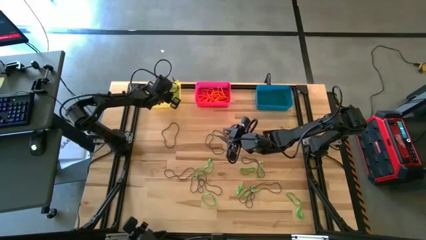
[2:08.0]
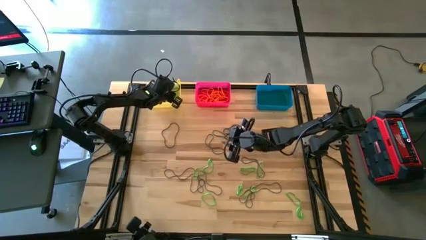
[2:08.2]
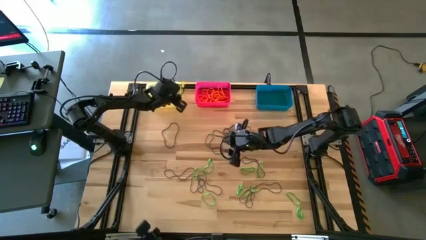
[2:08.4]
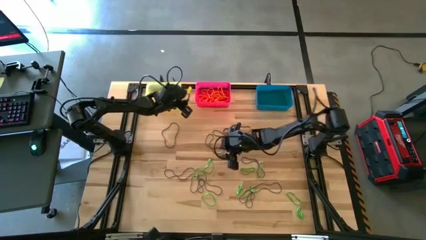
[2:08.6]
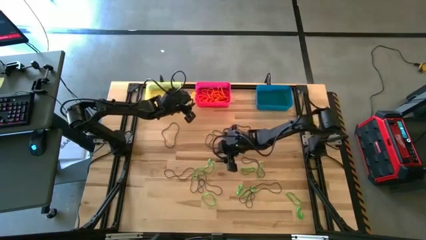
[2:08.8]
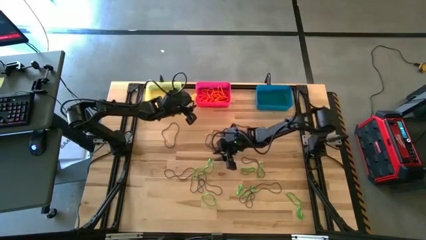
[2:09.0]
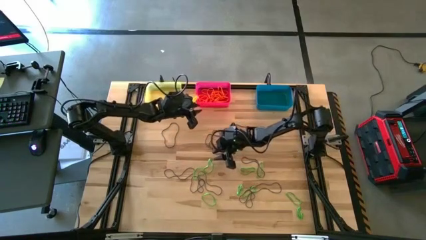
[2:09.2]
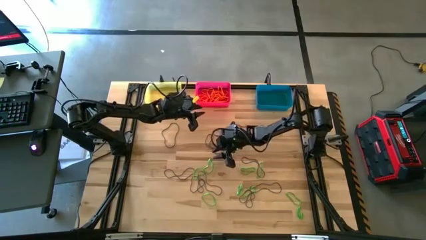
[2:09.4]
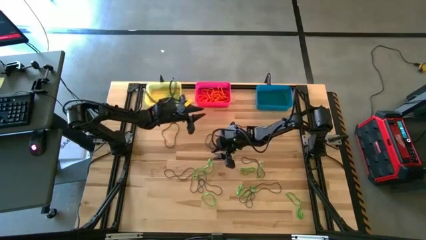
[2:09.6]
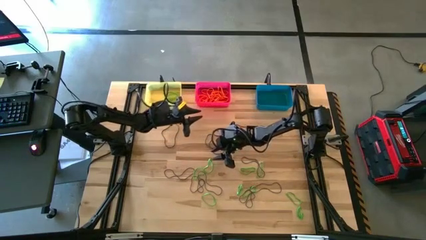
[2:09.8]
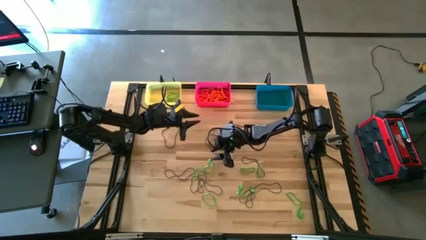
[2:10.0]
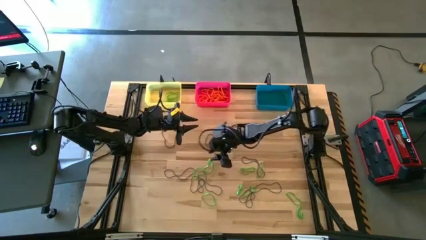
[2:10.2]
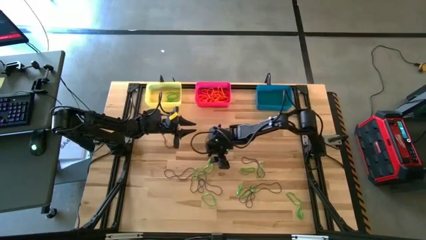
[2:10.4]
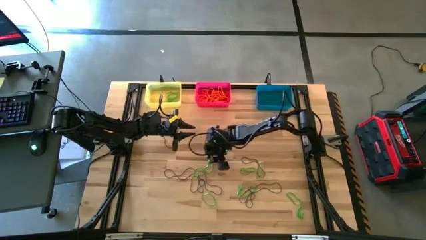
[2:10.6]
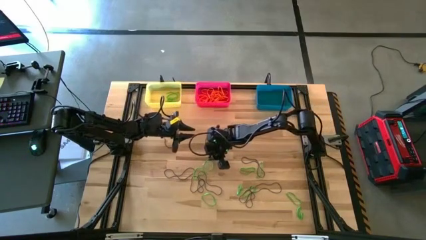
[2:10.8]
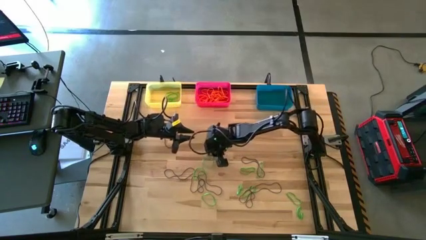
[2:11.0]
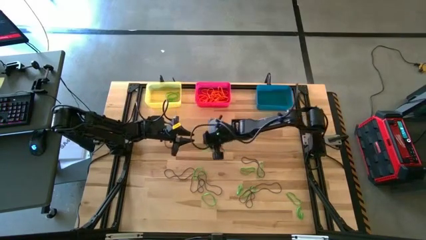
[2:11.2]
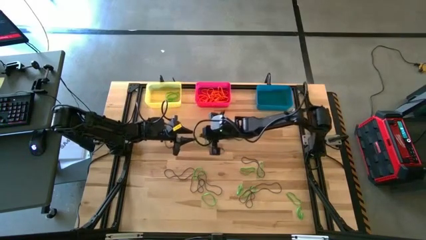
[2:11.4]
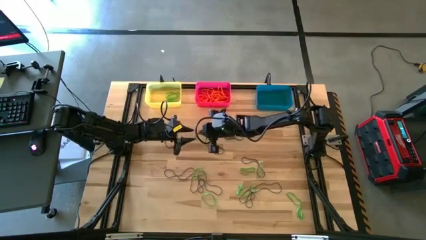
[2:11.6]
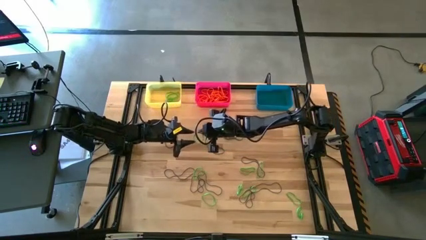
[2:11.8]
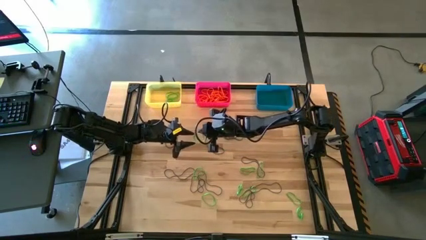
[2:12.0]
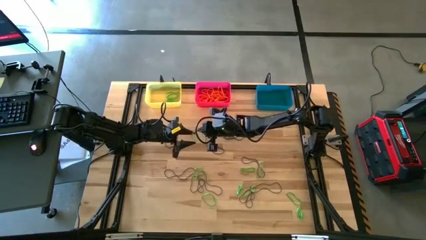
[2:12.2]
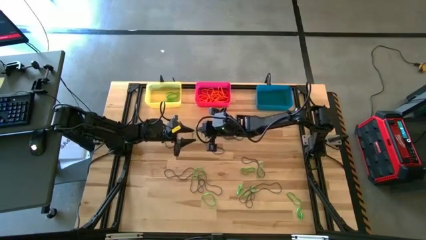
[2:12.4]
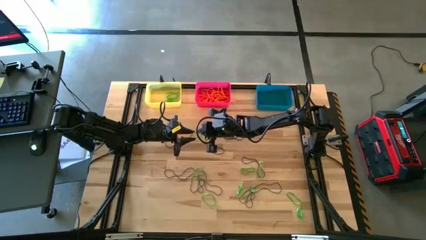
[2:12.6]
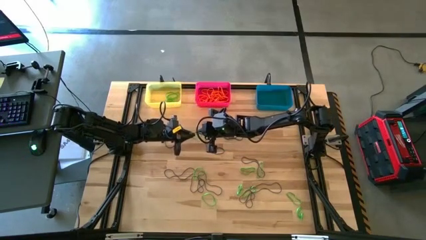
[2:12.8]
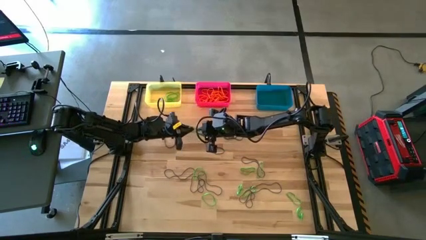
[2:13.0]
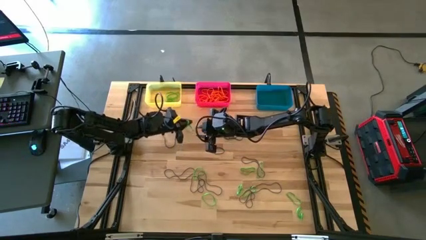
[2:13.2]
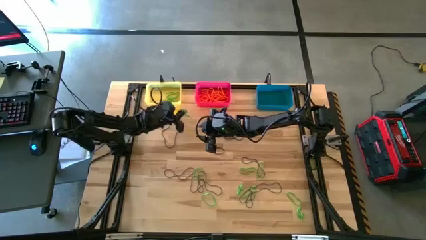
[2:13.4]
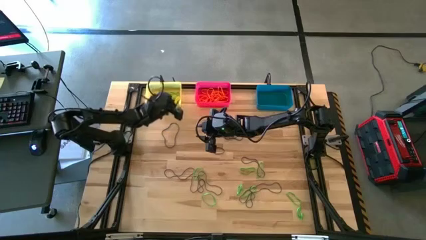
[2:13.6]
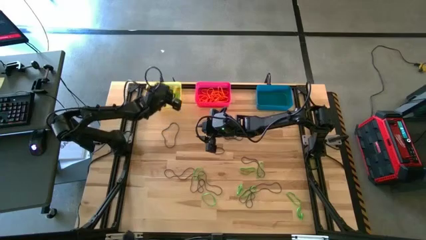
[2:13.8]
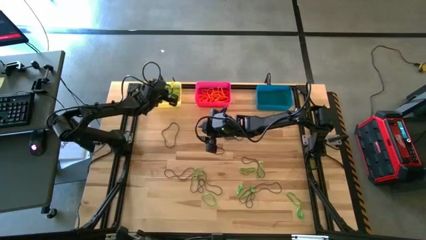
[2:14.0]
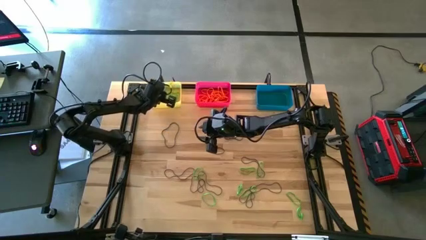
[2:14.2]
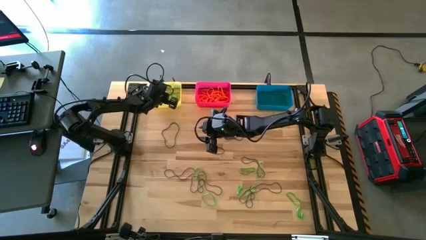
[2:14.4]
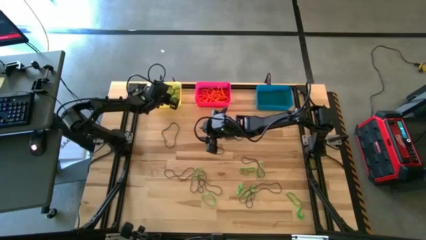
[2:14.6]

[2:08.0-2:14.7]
Task: Sort rubber bands into baskets
Put the green rubber band into the yellow bin

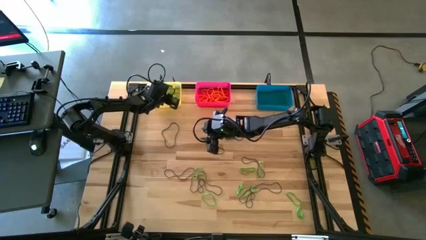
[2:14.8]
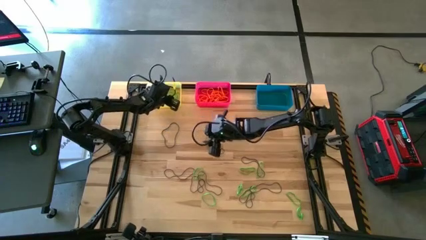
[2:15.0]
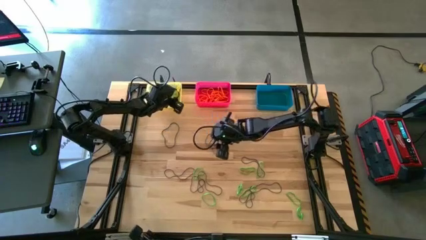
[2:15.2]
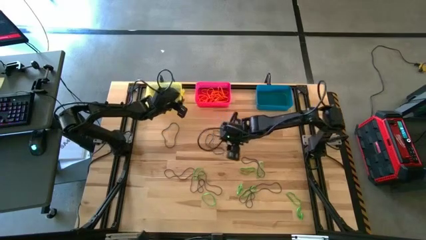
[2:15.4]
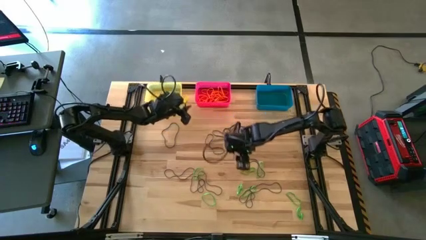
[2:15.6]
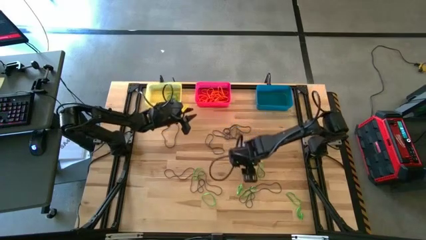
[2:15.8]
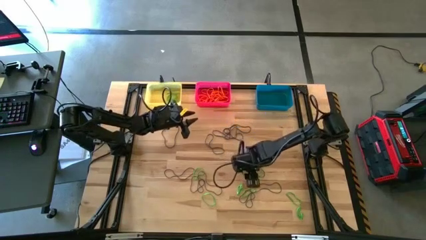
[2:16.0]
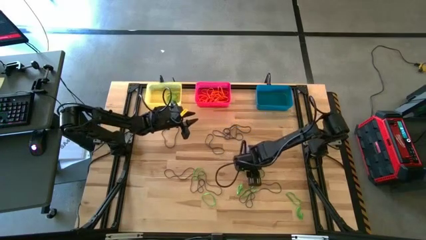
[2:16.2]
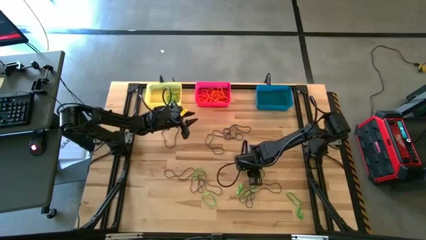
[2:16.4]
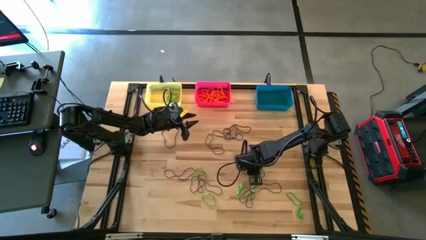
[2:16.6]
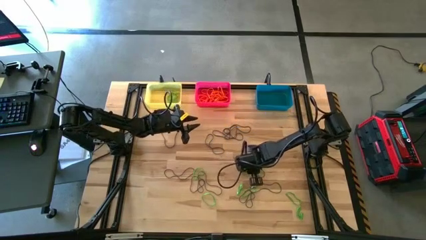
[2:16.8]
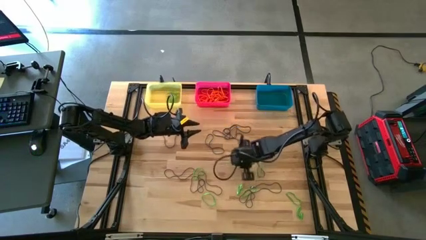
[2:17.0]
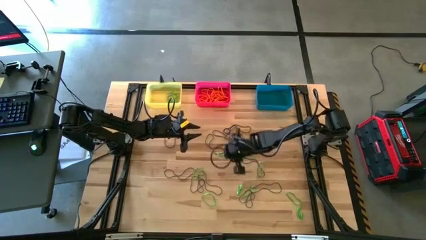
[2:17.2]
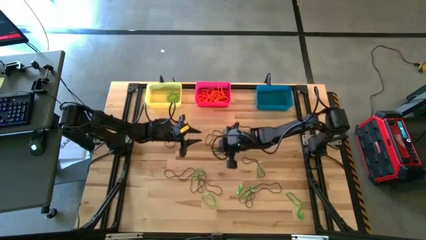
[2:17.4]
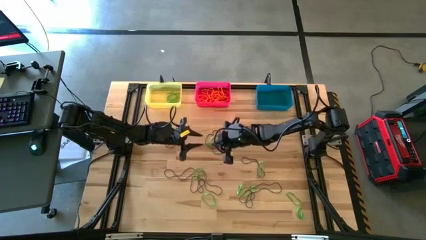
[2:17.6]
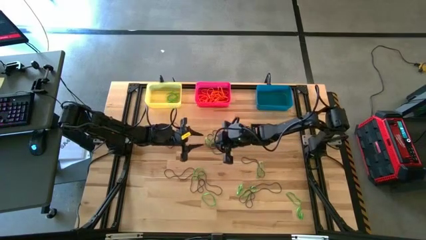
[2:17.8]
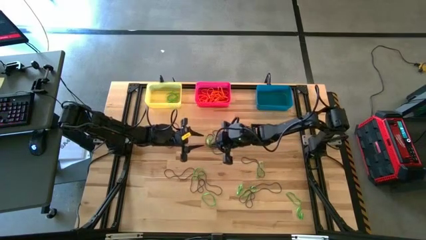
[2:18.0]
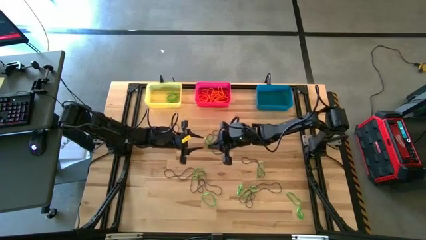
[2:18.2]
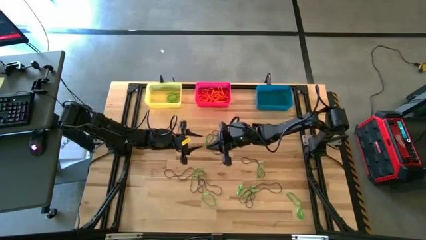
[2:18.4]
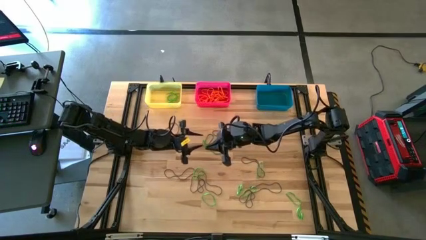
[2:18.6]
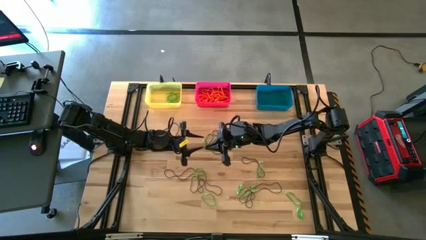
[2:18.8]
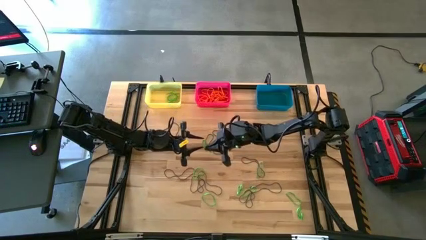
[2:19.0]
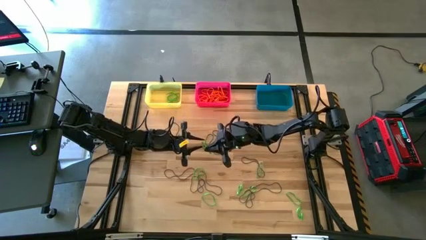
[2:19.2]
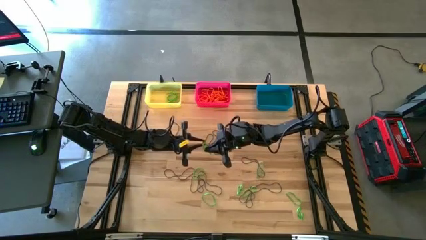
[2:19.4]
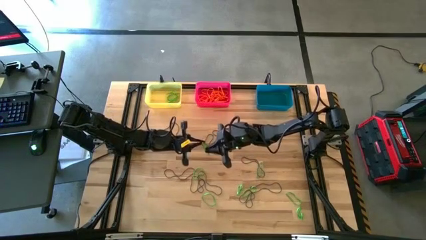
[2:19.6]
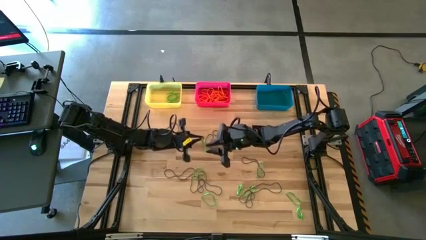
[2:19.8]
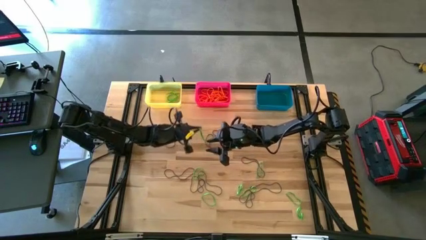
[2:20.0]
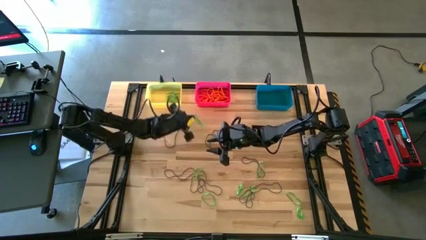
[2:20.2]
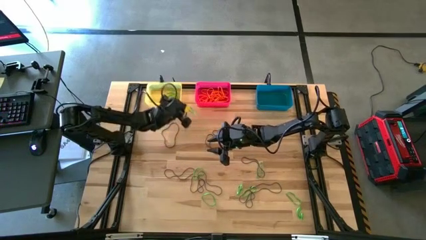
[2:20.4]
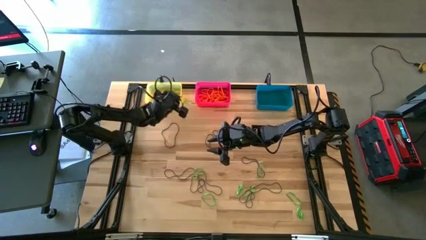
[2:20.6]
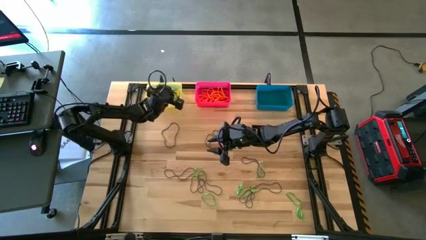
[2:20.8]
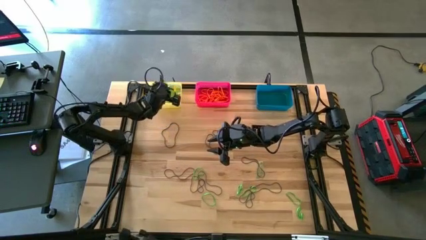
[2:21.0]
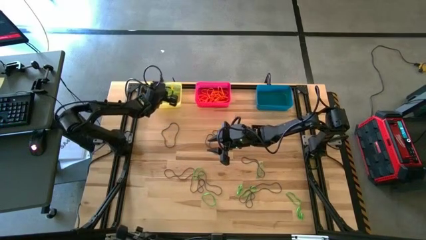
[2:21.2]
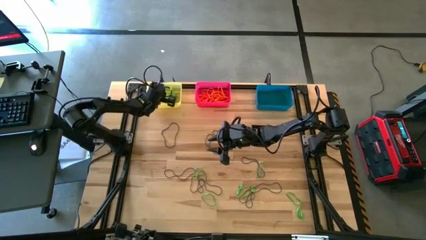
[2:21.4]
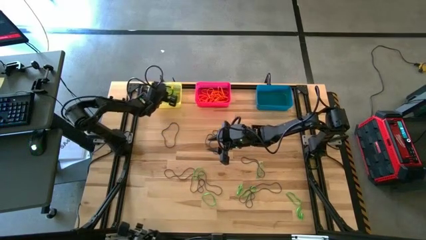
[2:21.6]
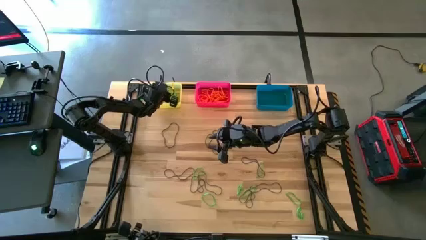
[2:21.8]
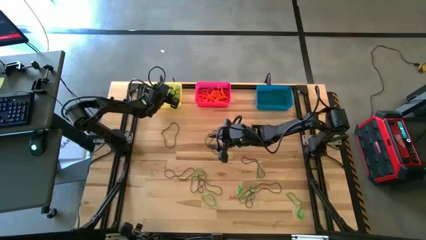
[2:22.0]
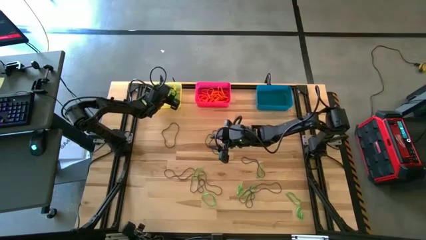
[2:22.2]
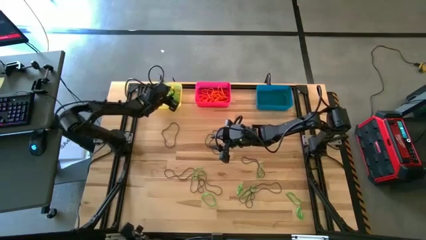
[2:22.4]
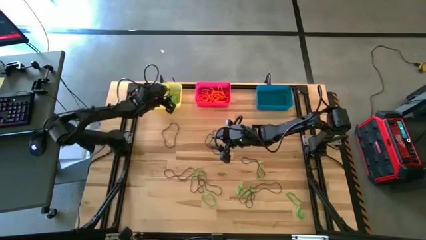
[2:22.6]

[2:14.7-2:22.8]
Put the green rubber band into the yellow bin

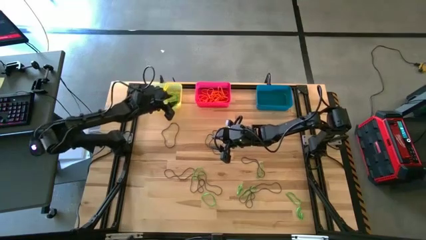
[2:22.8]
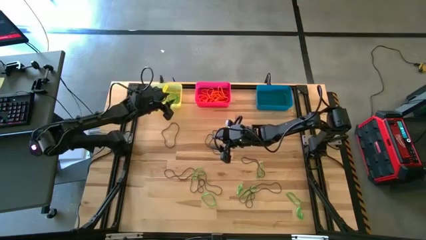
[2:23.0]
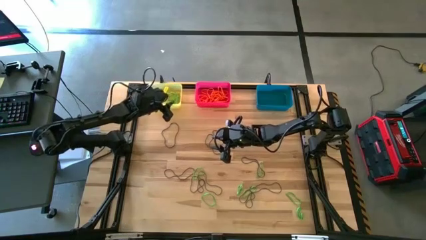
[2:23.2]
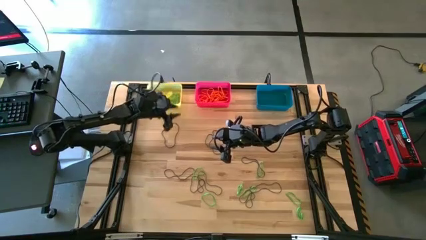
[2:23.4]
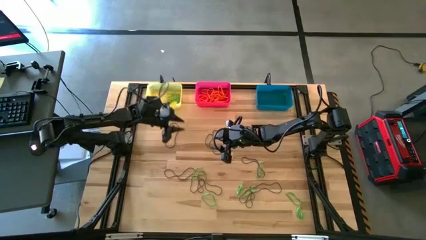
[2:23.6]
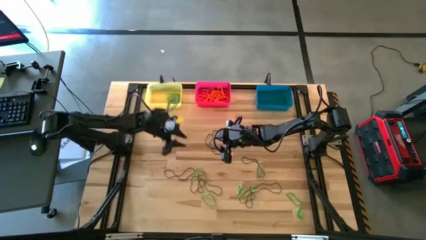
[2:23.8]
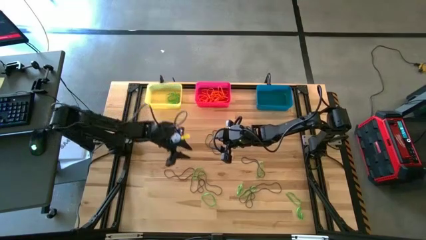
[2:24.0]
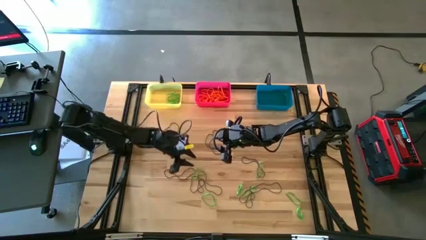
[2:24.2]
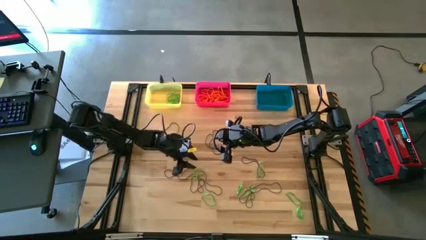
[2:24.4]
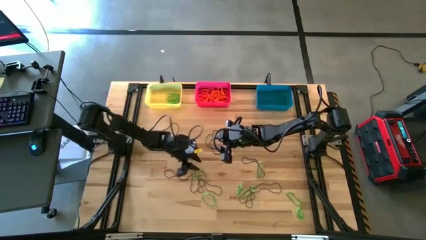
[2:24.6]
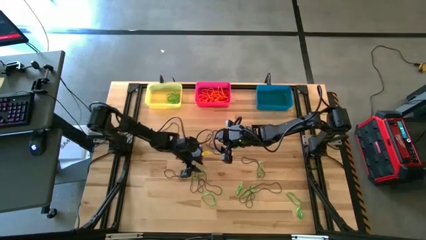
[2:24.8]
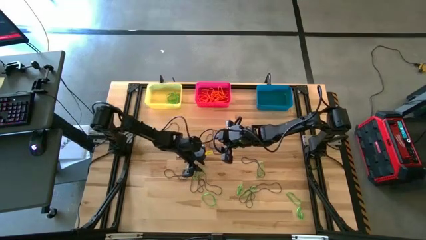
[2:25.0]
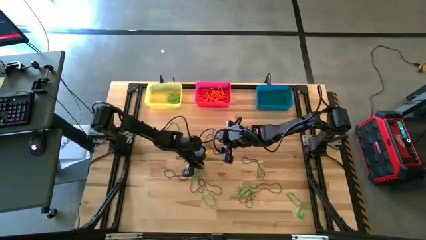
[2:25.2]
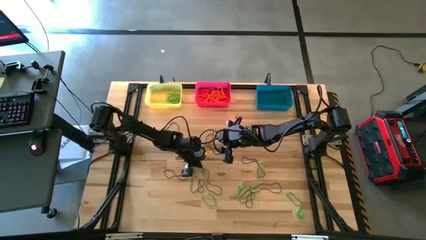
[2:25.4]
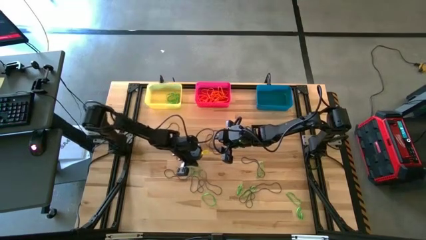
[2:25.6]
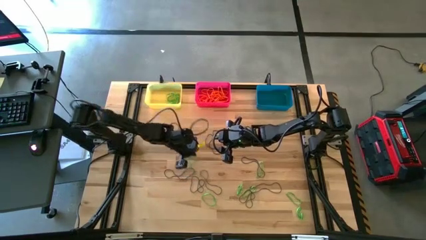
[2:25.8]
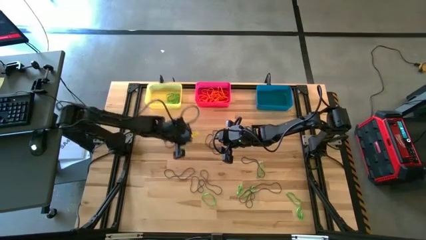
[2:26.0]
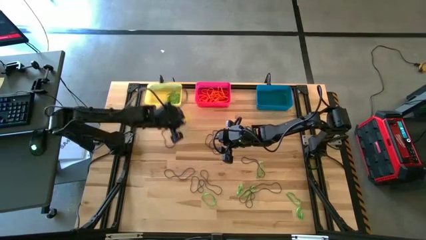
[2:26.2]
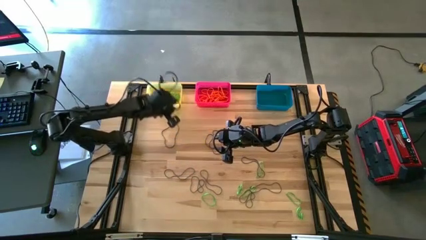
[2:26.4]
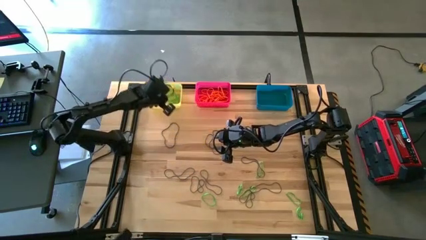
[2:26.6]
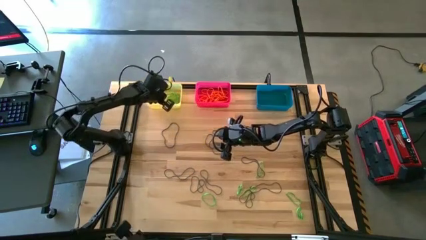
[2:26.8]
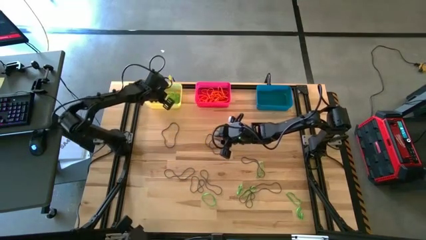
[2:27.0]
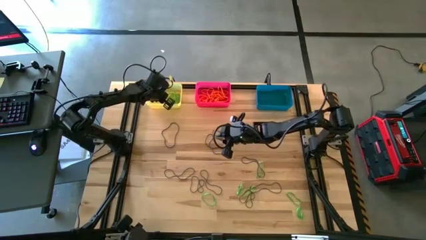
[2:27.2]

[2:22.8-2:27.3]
Put the green rubber band into the yellow bin
